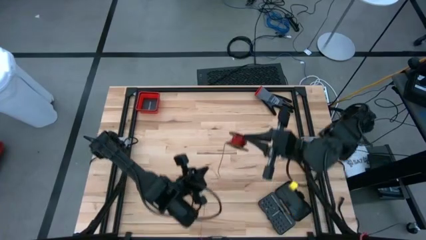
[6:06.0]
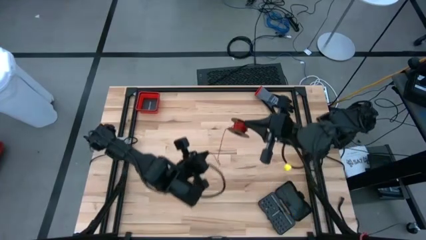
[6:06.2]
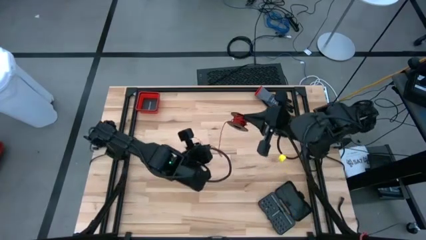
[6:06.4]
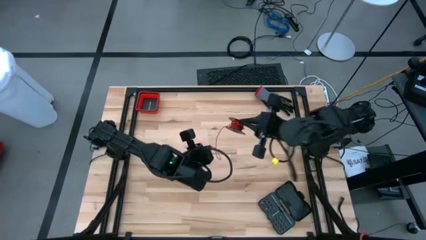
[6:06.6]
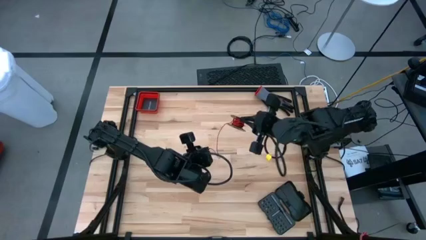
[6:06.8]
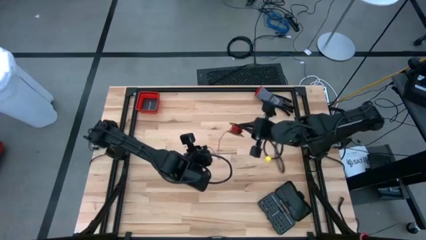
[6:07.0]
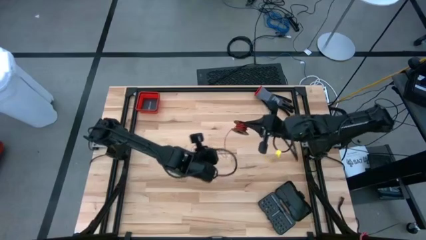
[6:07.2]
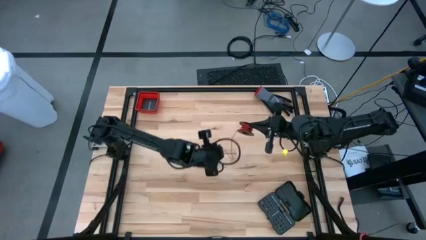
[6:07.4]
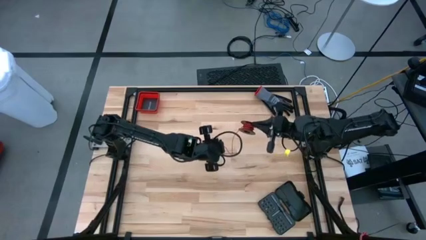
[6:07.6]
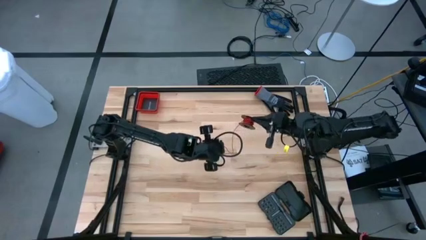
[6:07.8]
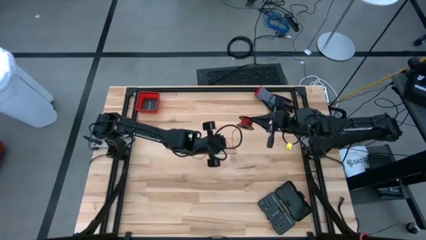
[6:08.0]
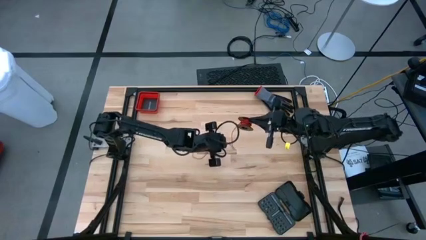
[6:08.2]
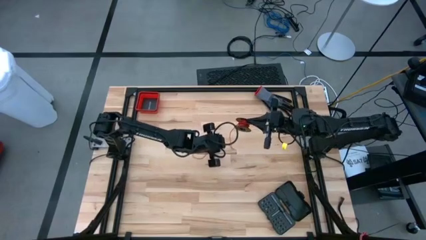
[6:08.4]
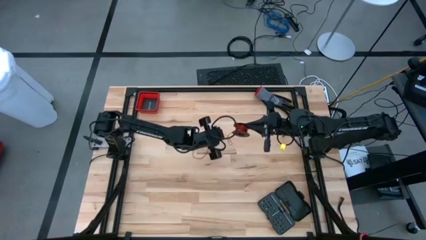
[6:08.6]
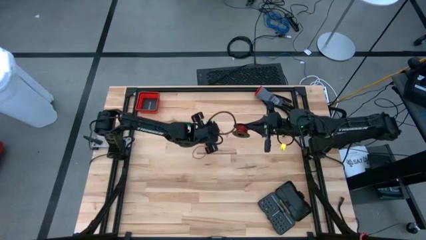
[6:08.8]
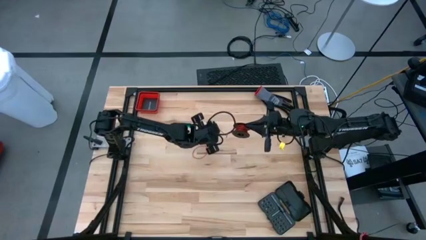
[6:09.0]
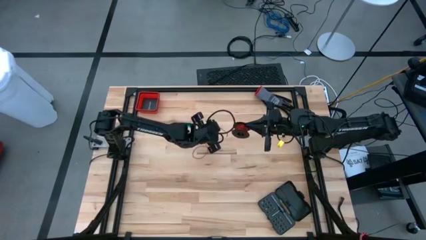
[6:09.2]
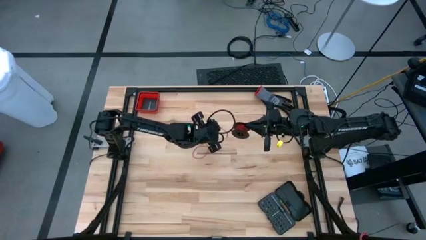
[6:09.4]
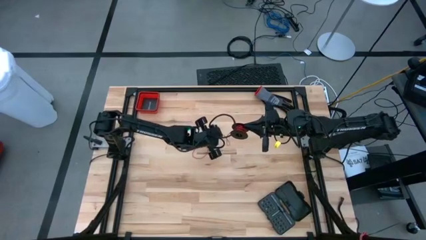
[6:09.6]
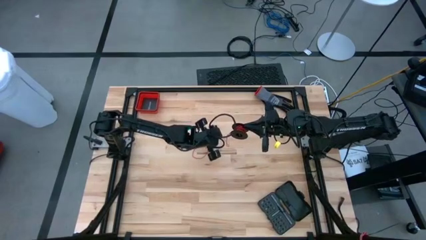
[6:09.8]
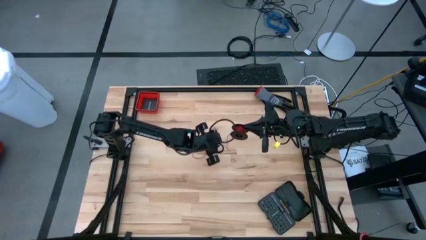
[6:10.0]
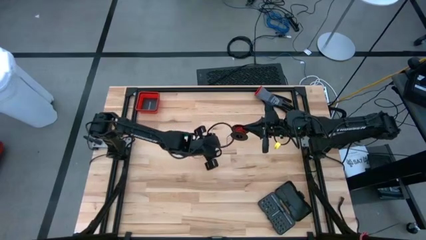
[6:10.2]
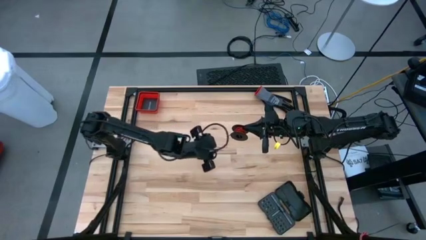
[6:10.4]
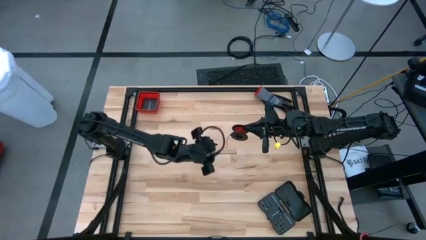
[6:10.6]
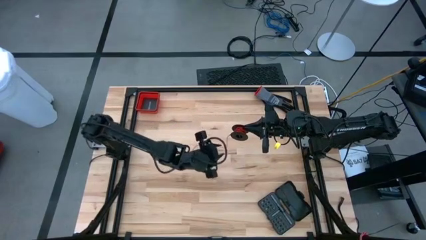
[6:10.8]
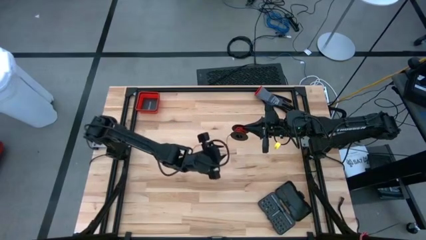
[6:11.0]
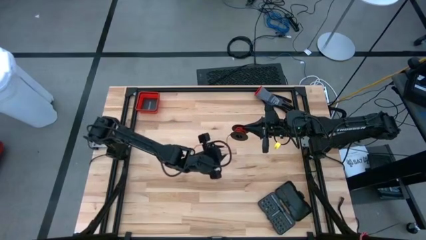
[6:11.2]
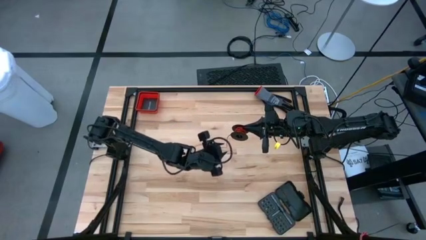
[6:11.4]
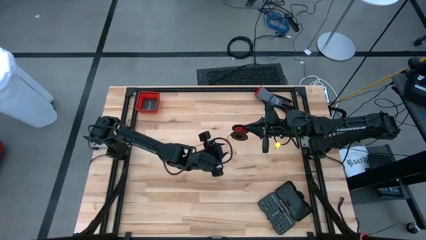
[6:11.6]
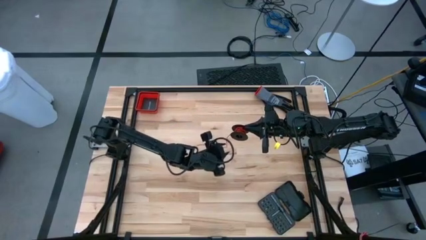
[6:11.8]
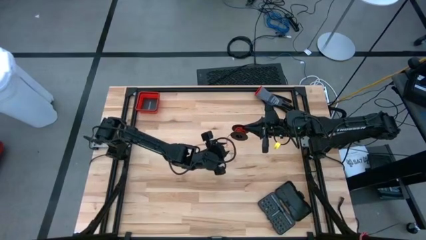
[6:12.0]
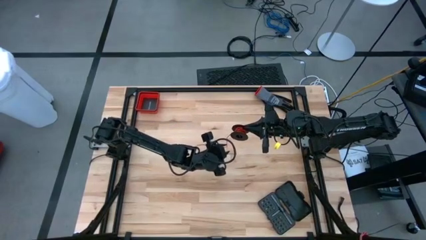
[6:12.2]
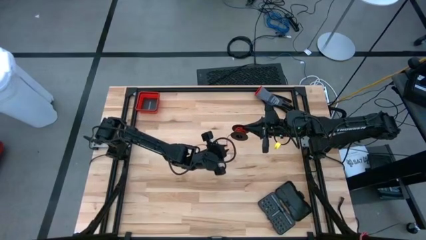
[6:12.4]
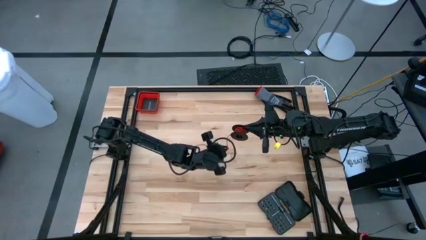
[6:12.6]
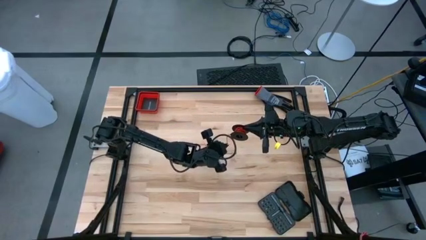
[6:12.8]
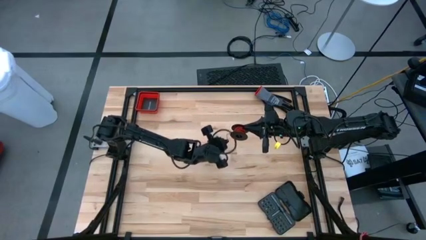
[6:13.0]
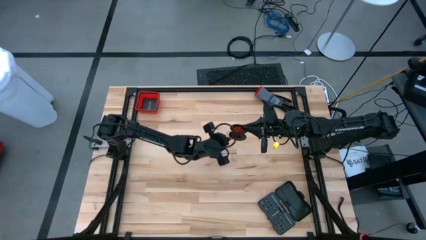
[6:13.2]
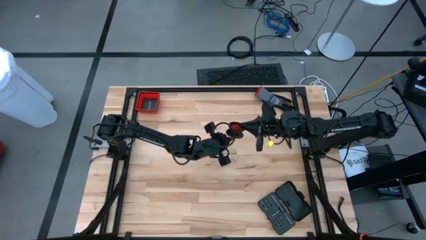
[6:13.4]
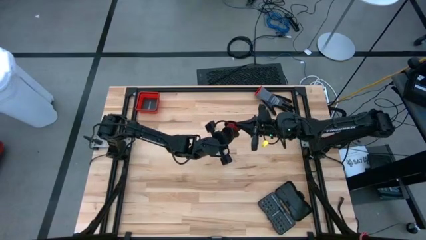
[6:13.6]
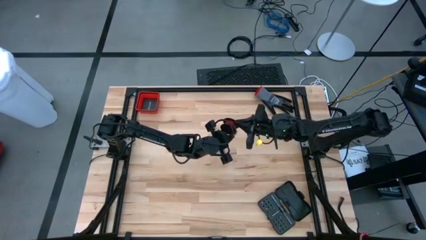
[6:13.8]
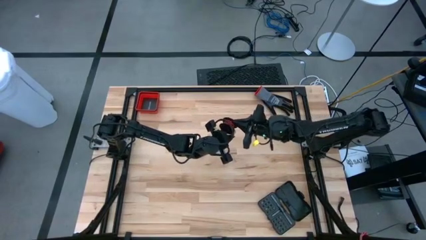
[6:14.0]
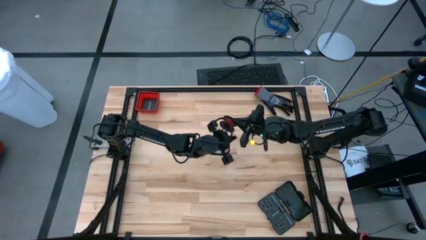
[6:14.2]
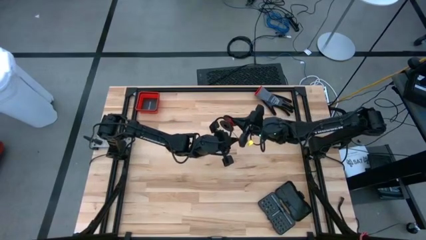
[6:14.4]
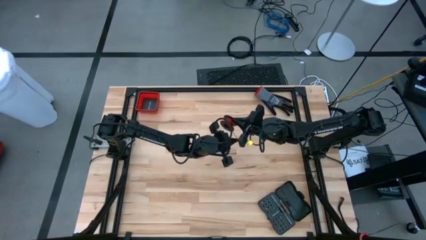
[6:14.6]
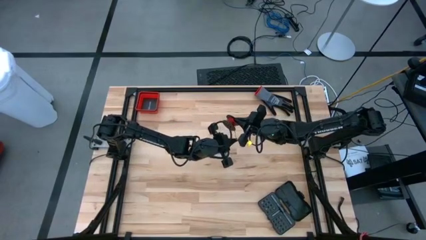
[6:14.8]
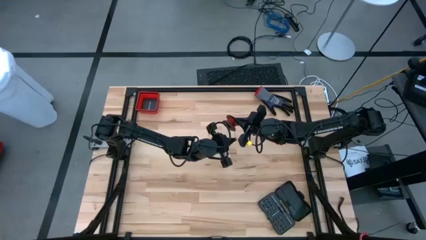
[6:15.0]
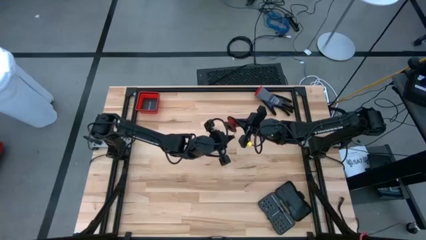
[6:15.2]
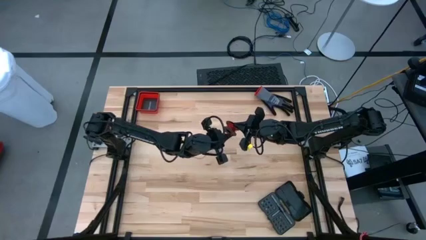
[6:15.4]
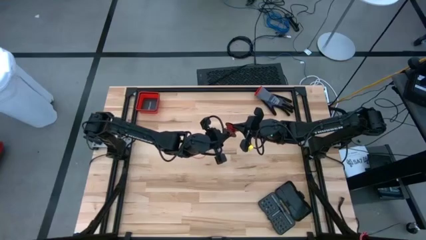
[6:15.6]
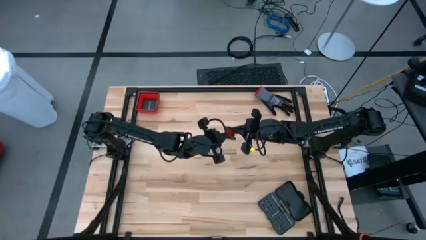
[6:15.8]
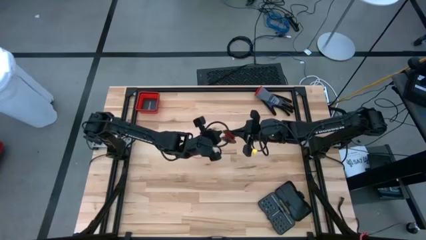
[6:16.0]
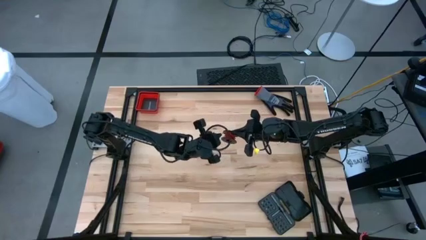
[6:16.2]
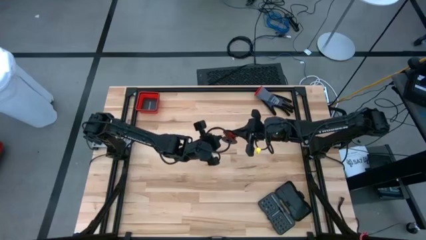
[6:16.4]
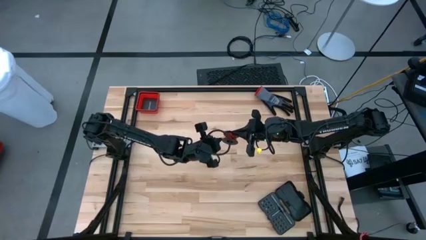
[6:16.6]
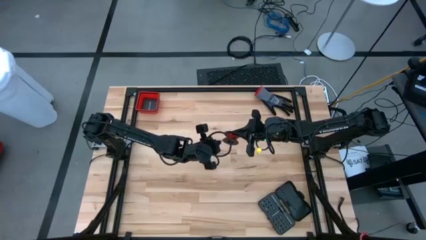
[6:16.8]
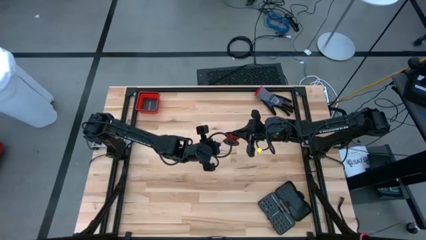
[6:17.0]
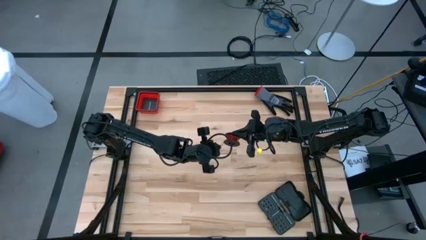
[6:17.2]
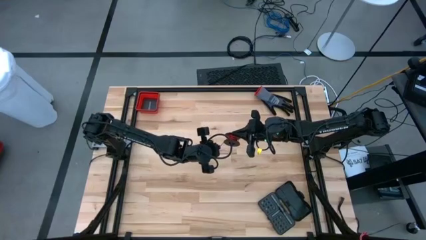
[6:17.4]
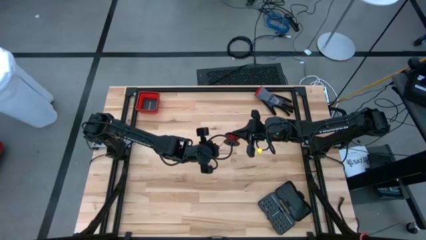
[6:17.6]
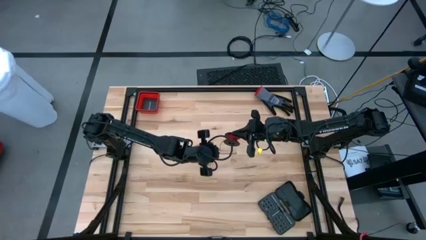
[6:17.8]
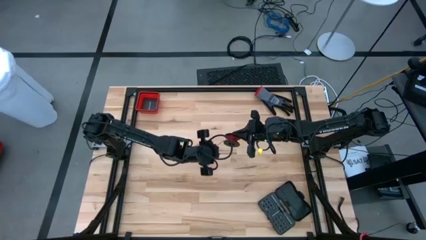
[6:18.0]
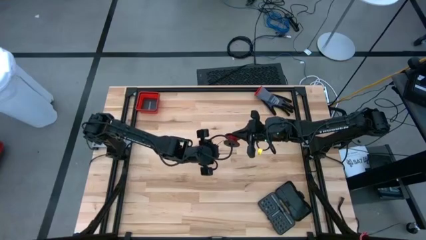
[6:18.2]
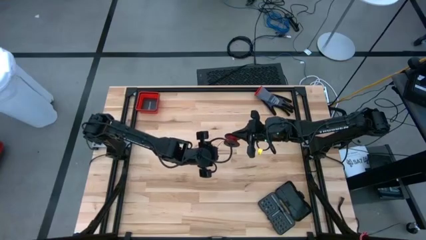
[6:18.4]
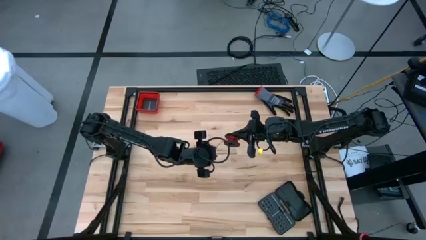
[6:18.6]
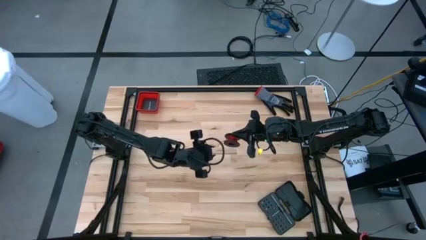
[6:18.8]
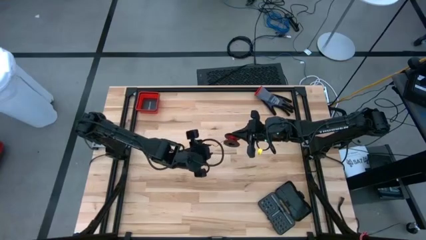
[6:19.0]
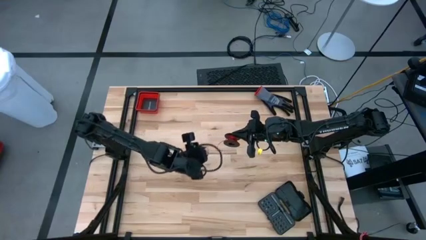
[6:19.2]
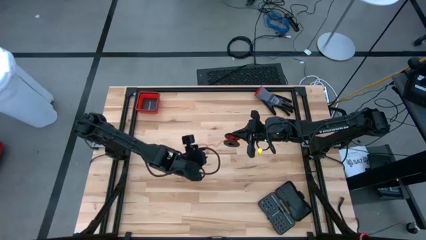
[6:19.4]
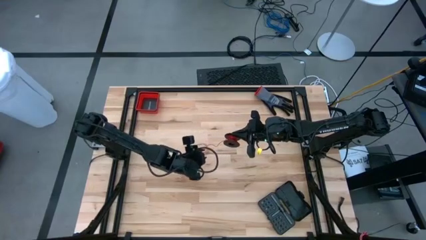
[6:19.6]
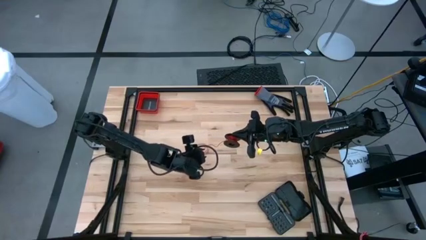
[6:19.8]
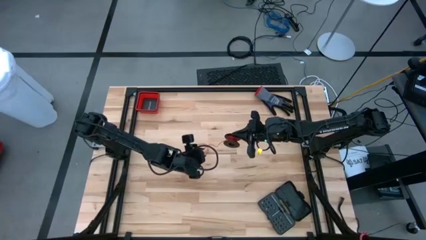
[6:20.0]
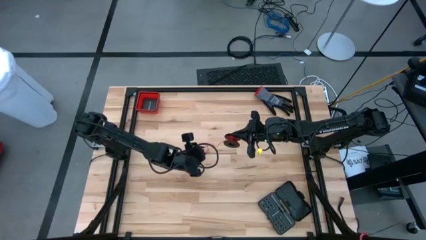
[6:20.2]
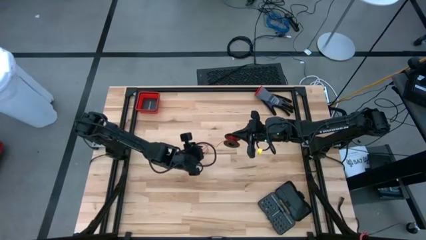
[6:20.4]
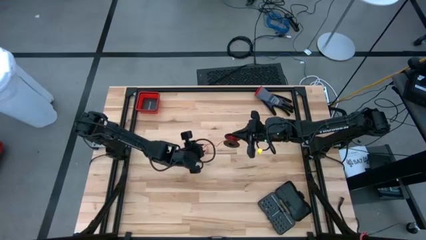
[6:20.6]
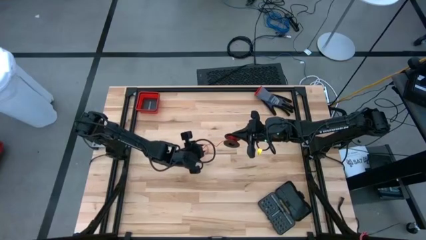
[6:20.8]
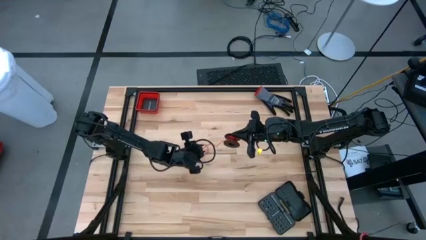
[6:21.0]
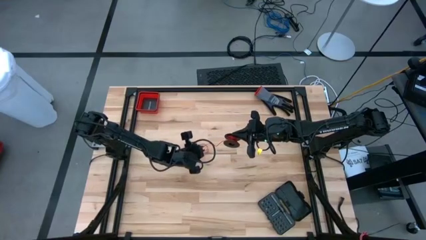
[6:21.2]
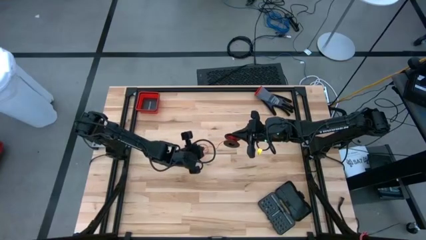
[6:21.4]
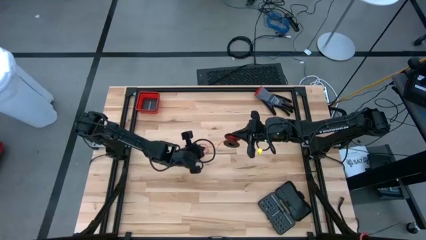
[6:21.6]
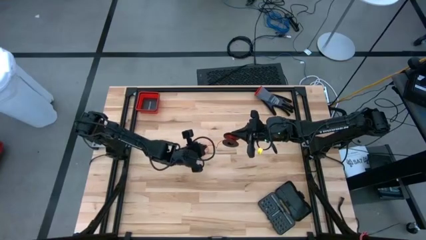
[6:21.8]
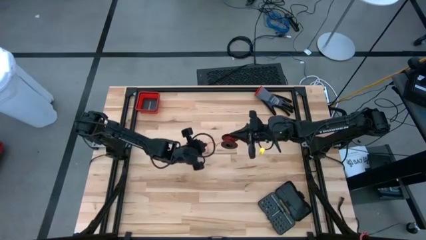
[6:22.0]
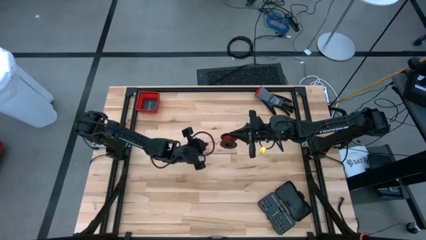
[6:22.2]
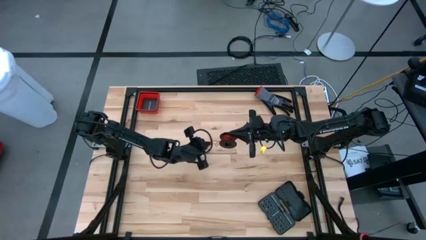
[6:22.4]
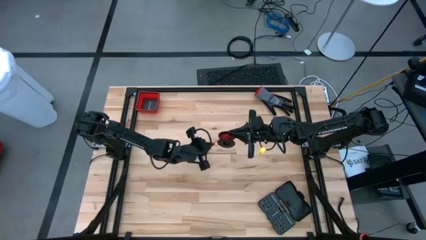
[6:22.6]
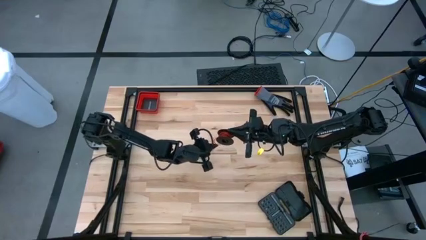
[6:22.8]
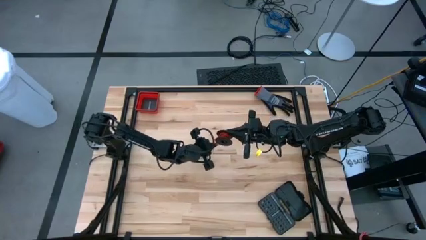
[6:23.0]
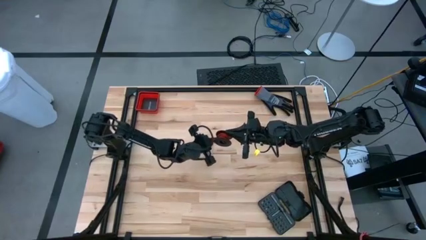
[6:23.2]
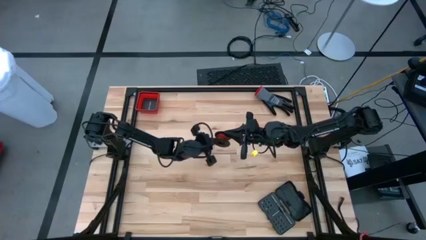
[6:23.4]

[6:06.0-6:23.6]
Task: Coil cords
Coil the red wire onto the spool
